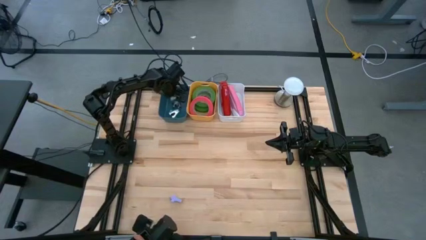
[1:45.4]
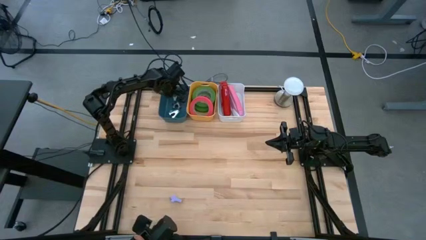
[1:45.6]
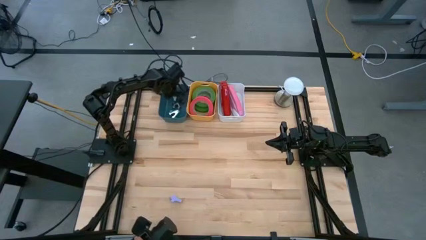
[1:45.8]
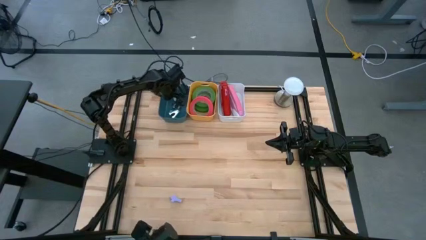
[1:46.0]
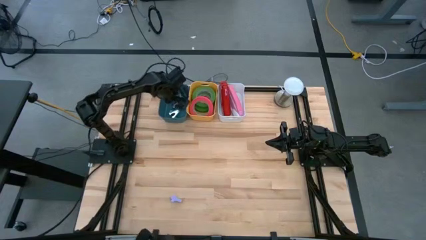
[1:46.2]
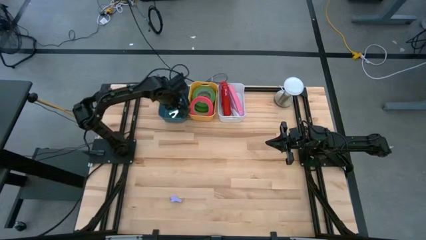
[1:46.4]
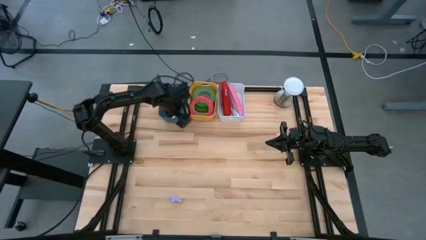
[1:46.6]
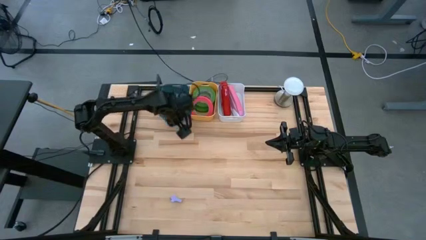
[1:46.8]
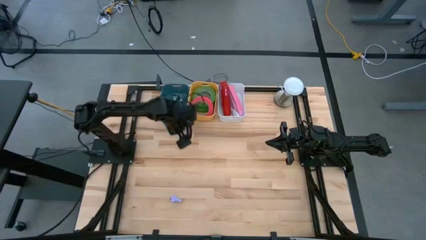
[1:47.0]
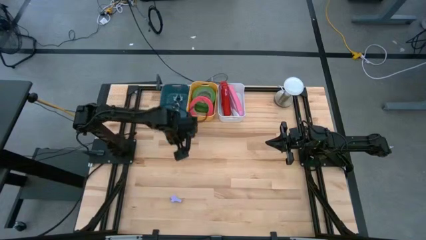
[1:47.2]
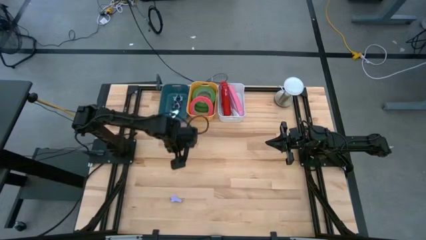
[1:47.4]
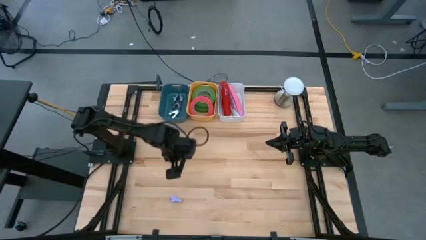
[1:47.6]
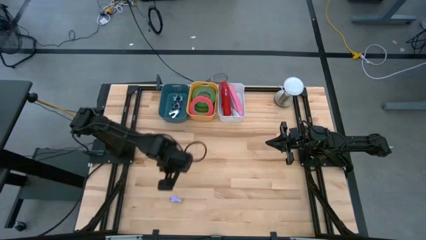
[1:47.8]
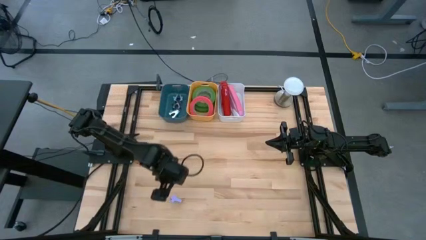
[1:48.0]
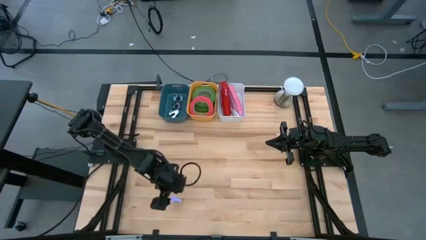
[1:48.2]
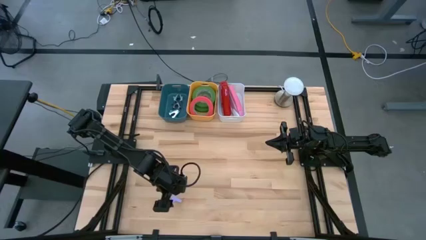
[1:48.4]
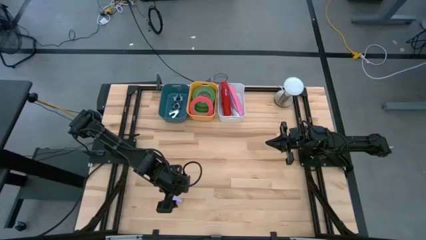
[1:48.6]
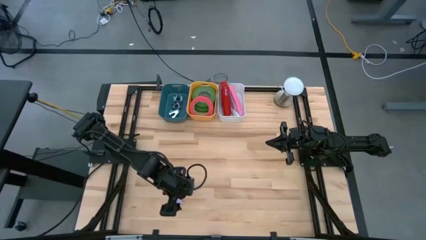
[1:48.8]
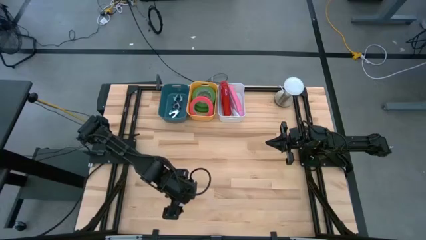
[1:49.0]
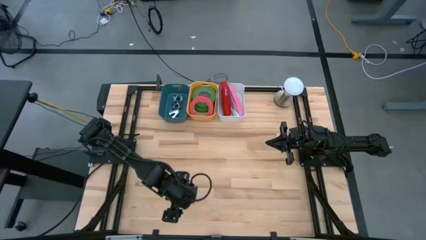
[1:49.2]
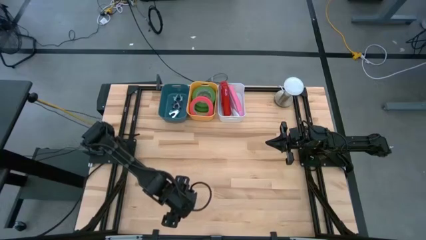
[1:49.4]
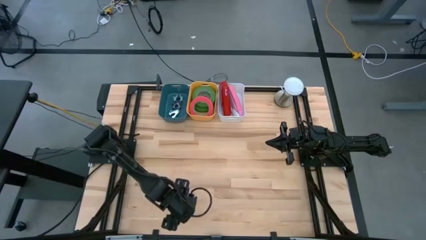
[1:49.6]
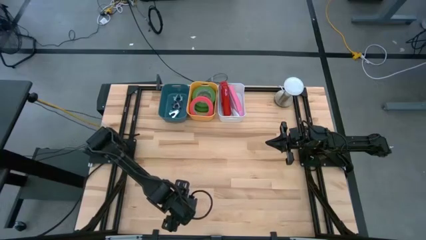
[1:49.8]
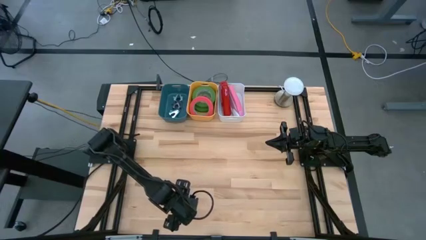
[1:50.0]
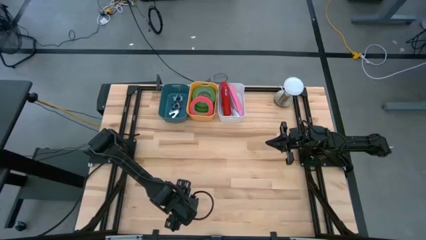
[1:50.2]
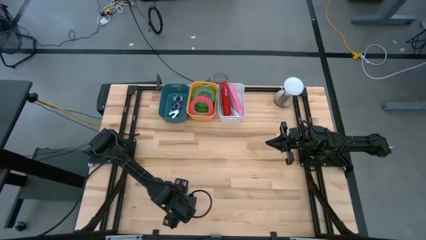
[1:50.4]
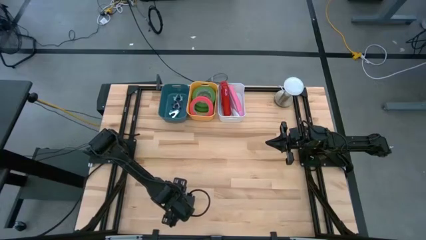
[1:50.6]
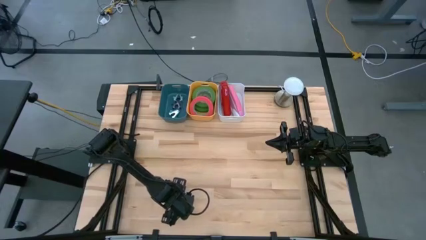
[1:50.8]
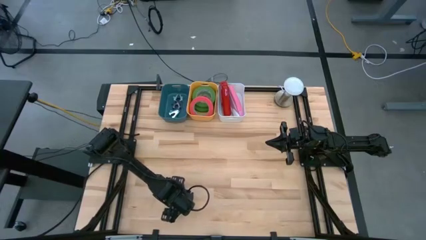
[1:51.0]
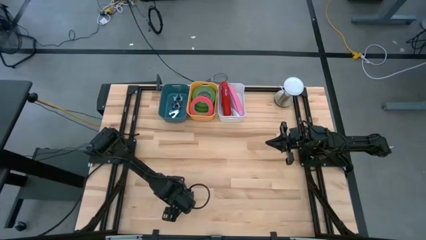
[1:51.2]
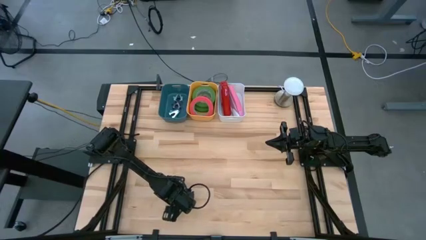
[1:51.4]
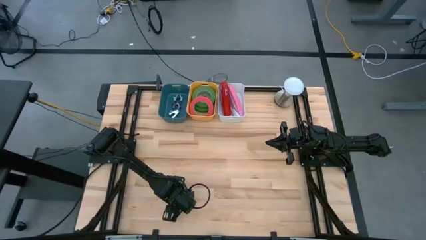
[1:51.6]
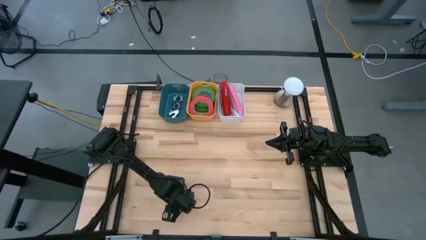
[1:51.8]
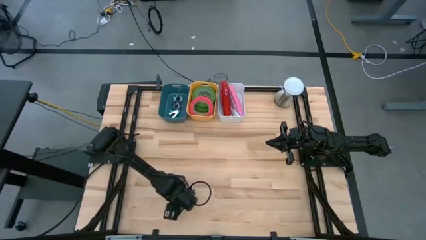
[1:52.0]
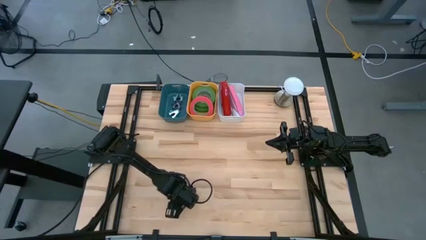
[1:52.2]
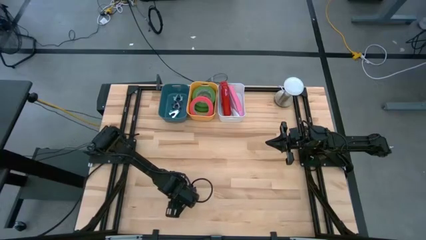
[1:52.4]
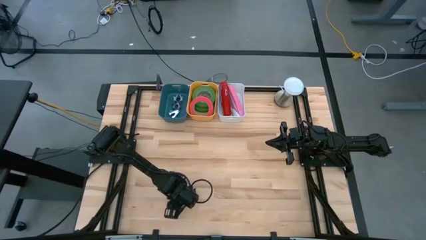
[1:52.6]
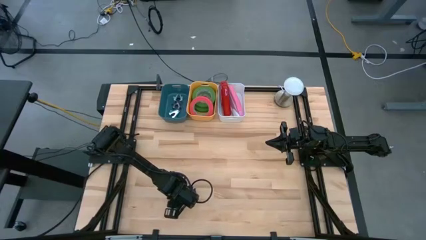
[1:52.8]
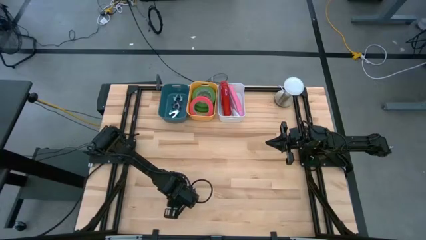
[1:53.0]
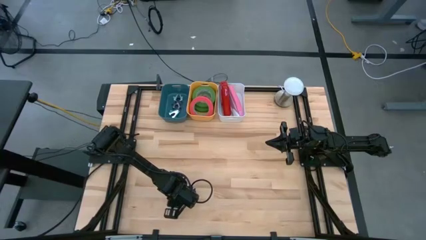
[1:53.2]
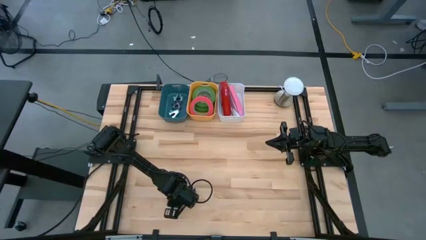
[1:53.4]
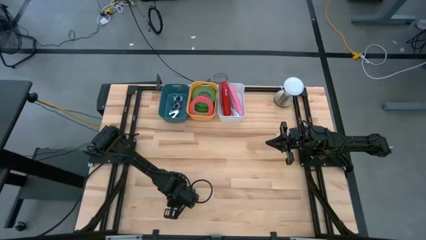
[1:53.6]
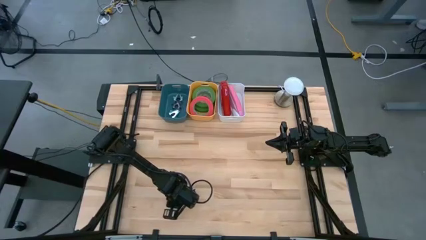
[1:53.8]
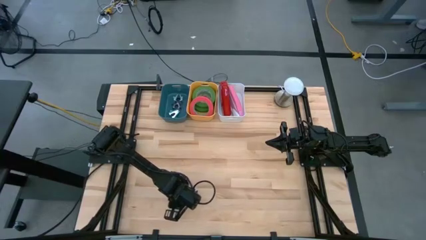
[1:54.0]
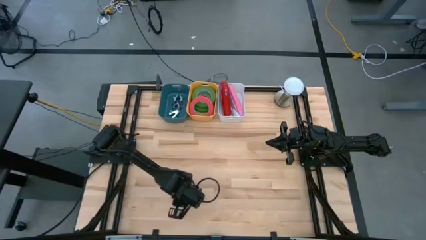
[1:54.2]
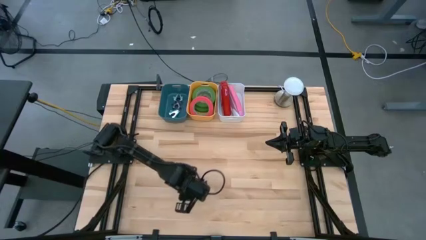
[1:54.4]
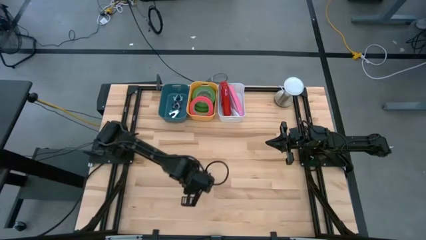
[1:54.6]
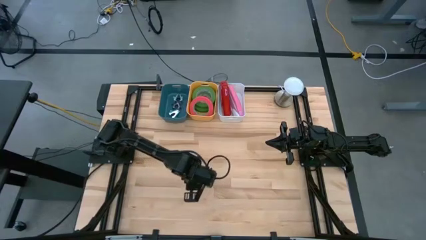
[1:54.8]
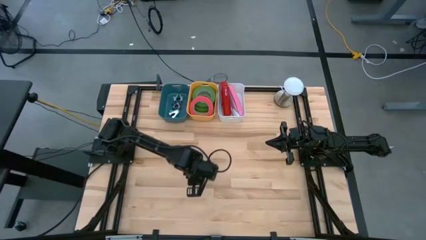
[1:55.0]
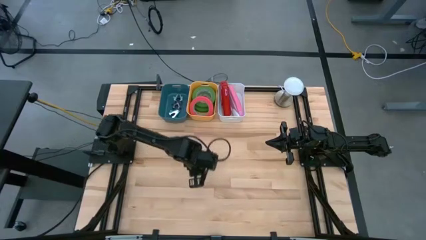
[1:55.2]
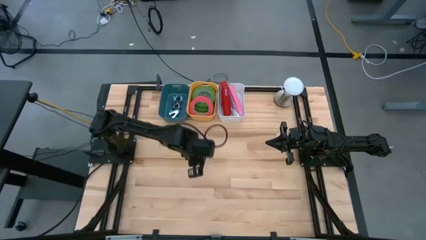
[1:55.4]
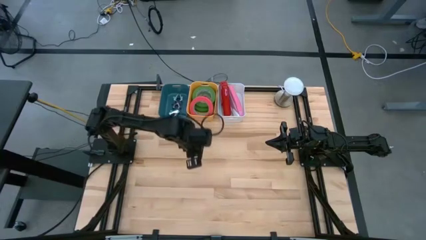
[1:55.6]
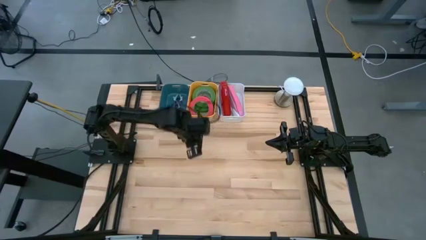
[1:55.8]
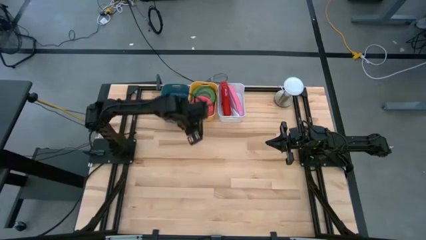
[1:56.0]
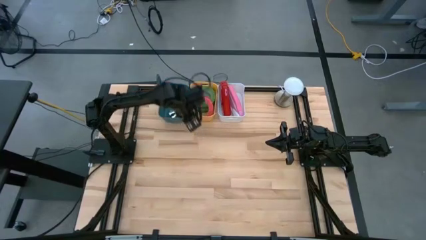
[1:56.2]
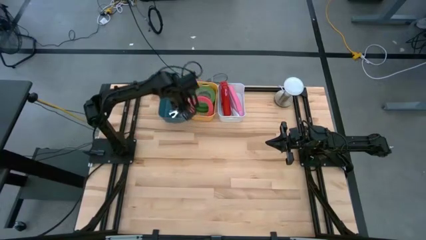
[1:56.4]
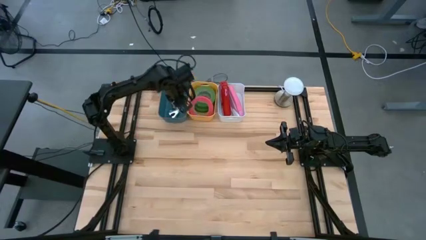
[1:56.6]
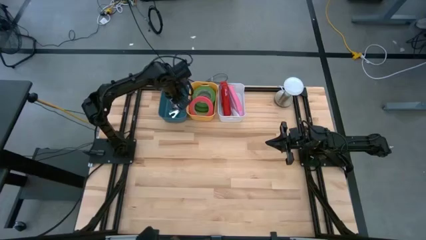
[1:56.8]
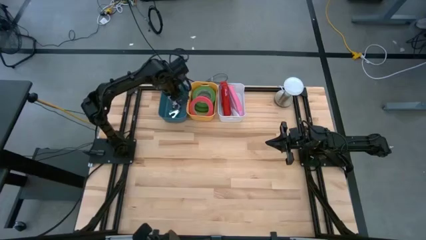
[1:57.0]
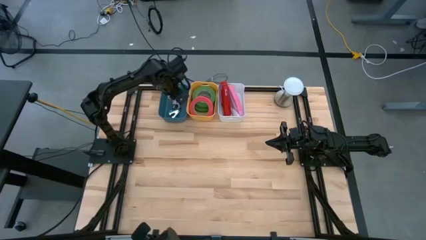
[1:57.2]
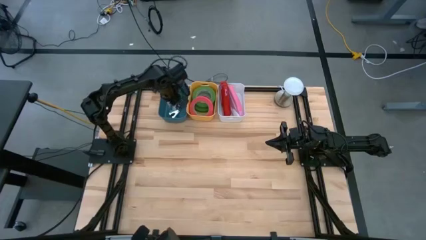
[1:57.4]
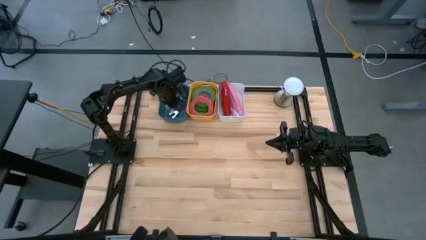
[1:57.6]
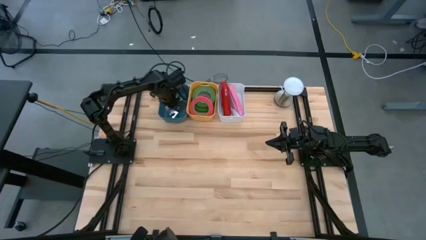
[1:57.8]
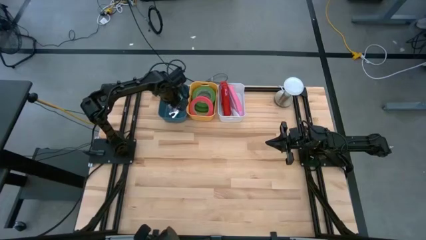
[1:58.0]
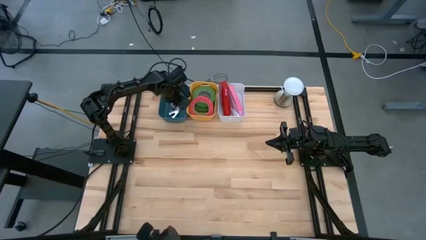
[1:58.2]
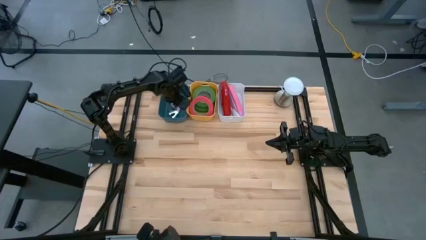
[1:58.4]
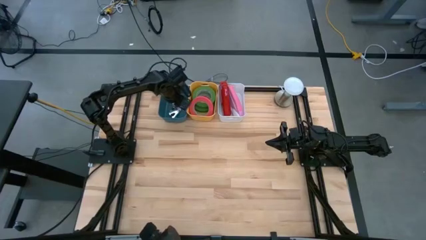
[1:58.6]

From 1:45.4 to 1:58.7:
Task: Pick and place Stapler, Stapler remover, tape
Put the purple staple remover into the blue bin

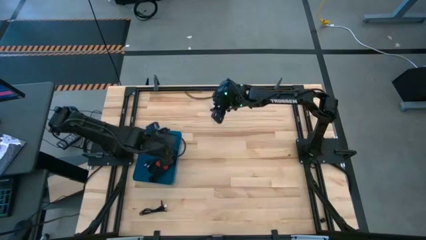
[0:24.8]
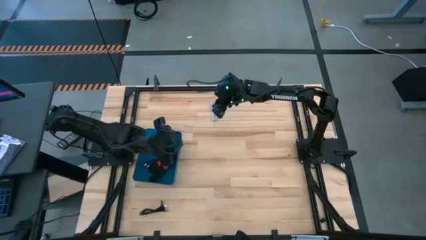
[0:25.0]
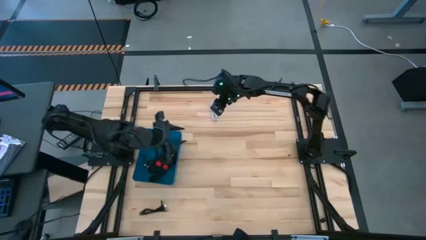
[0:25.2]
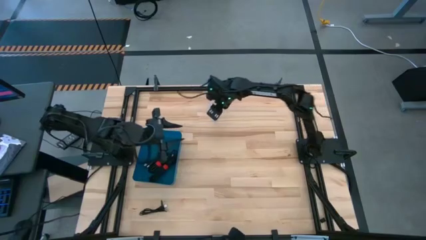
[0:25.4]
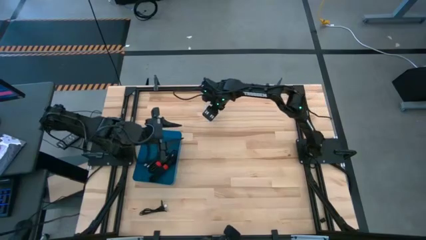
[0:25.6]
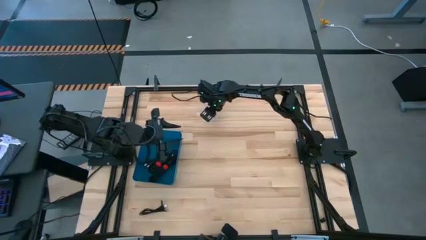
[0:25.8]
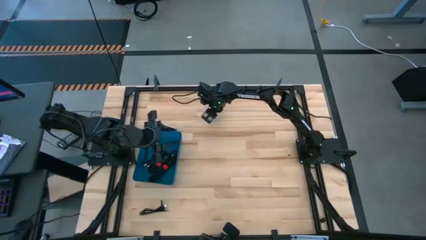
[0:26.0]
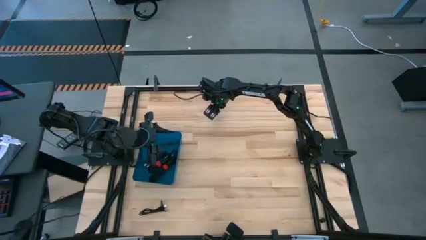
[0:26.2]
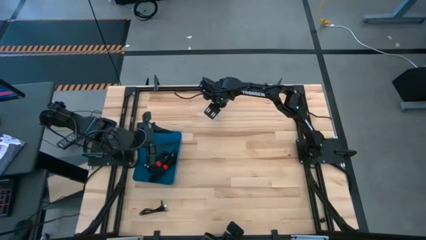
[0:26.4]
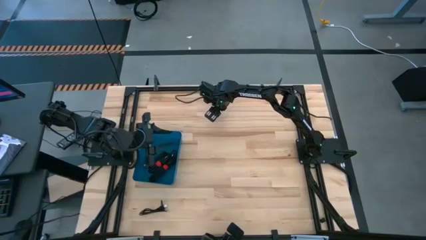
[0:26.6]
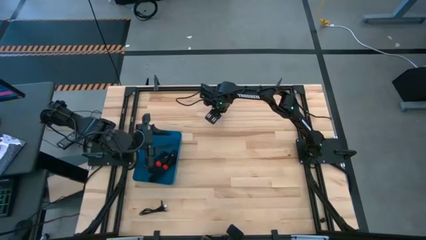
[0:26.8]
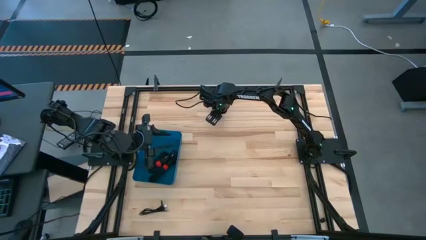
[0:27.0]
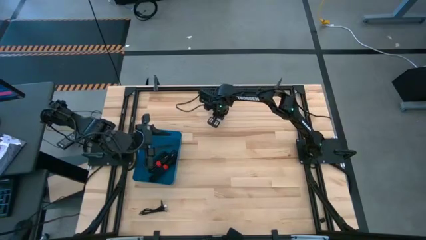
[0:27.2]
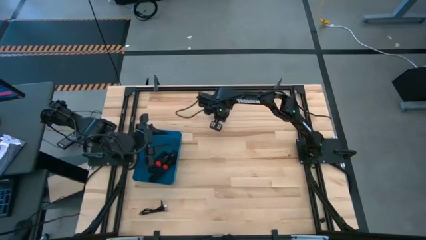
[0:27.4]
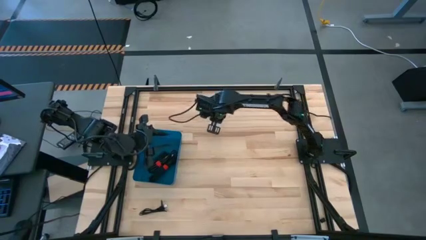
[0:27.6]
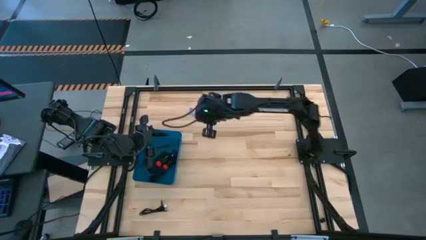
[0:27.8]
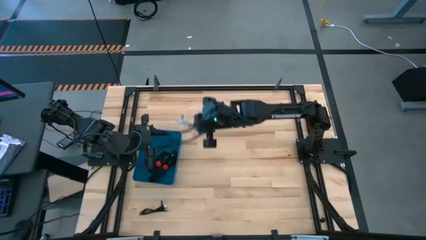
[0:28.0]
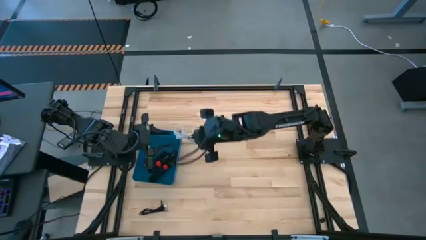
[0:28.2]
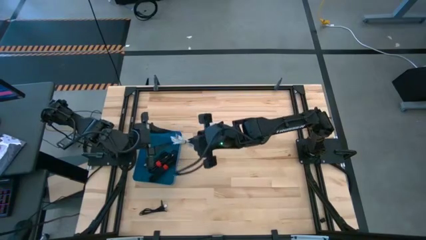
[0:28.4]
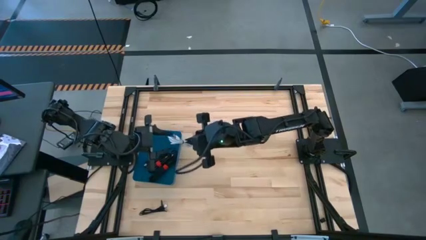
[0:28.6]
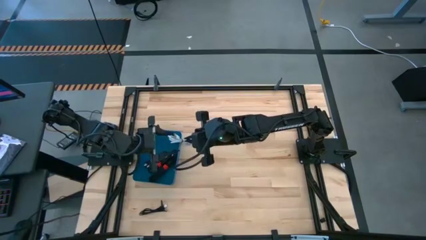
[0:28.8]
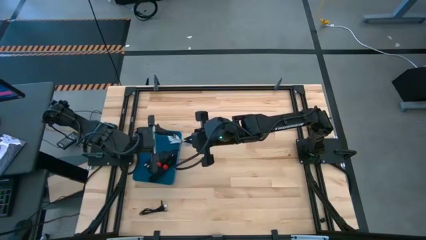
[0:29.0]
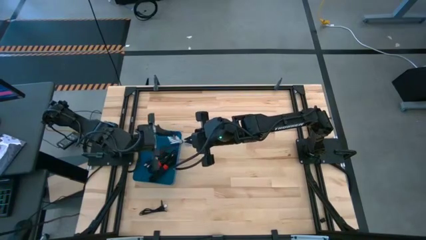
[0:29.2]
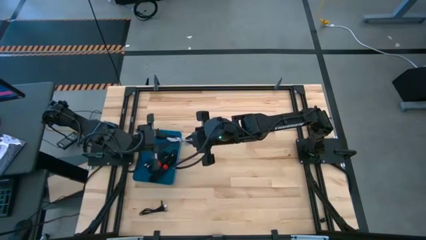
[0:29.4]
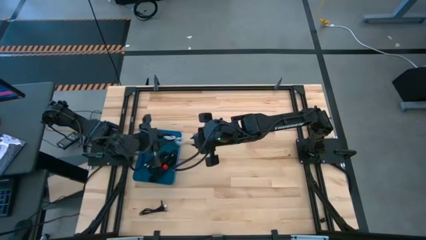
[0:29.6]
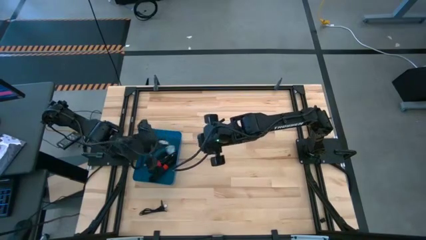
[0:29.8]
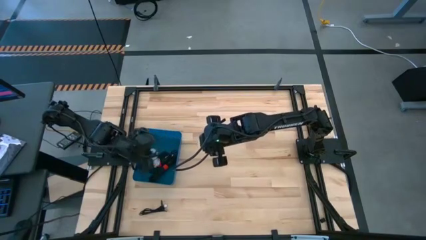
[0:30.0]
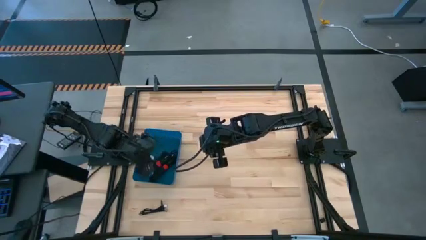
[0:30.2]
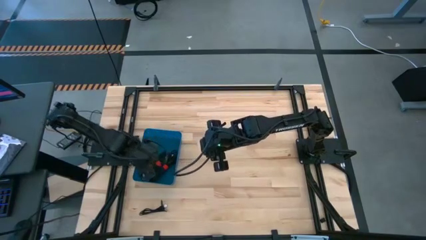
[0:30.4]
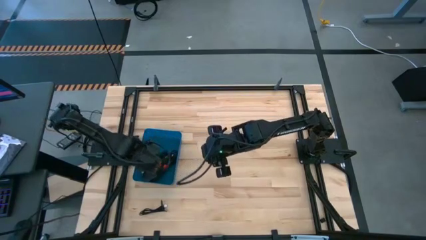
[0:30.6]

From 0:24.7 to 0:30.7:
Task: Pick and place USB-C Cables
Put the white charger cable into the blue bin
